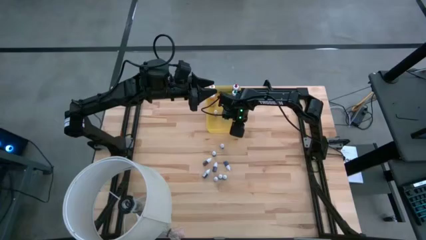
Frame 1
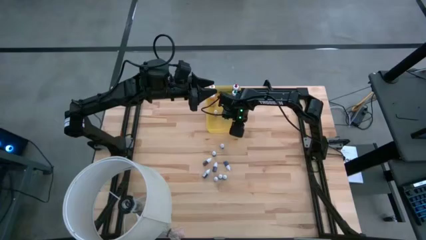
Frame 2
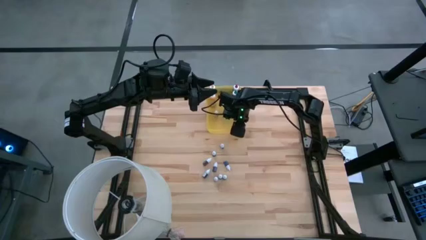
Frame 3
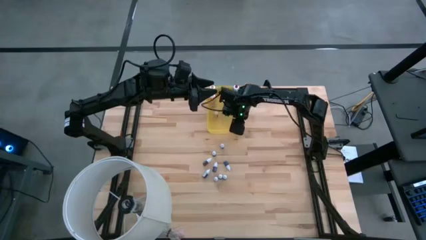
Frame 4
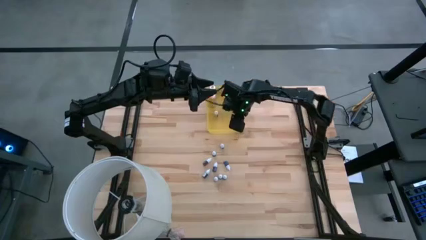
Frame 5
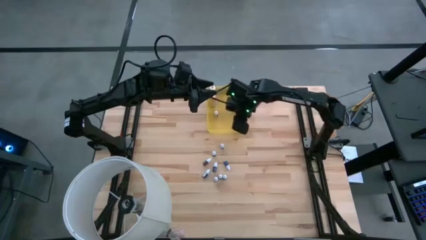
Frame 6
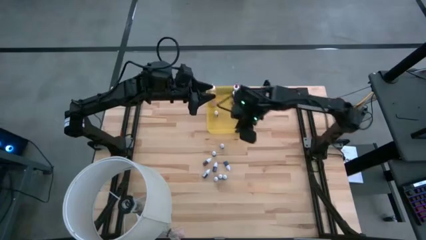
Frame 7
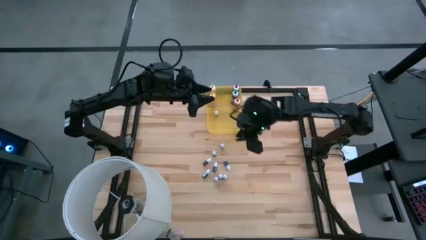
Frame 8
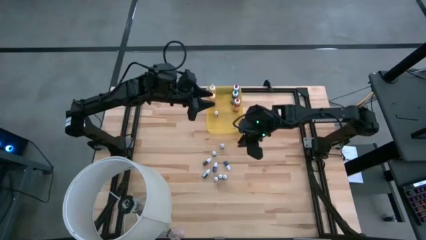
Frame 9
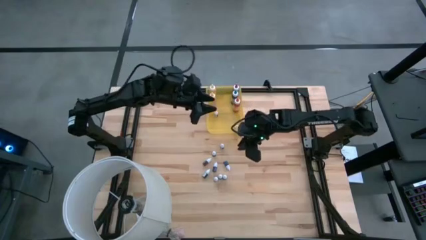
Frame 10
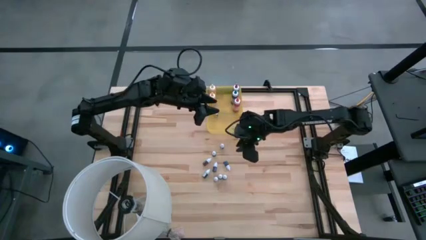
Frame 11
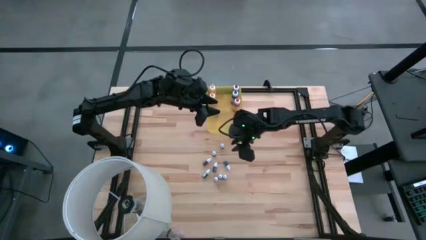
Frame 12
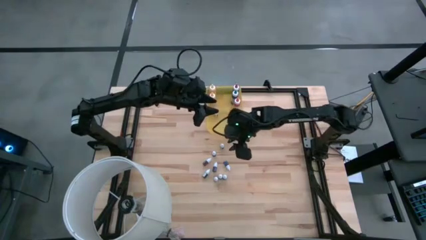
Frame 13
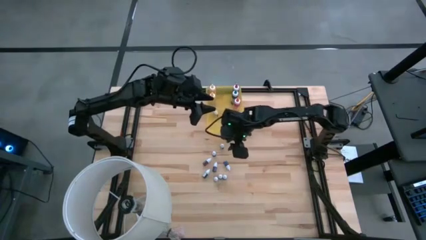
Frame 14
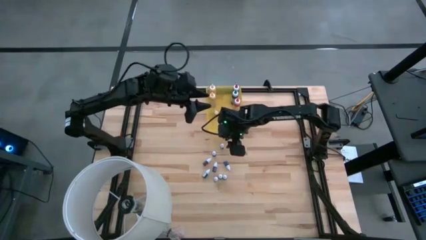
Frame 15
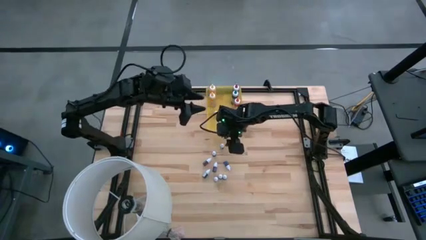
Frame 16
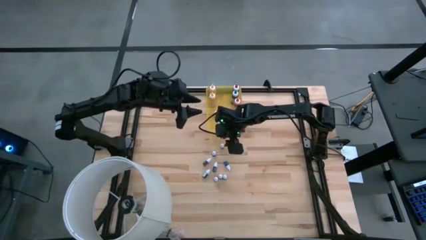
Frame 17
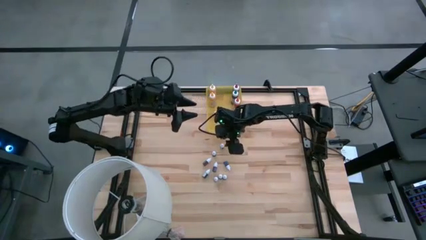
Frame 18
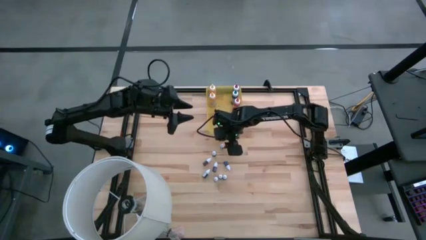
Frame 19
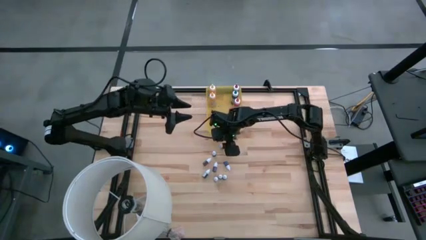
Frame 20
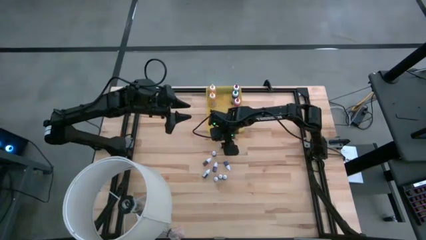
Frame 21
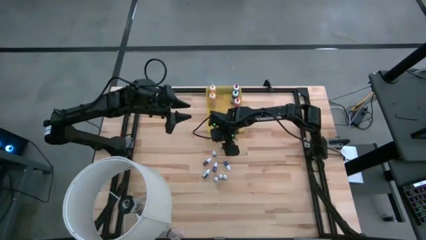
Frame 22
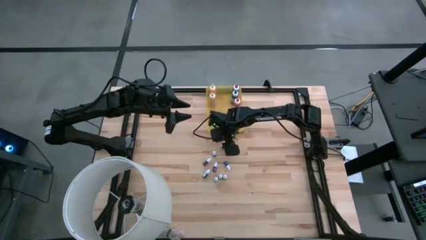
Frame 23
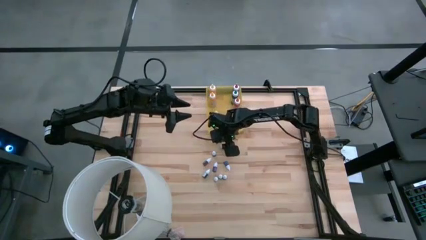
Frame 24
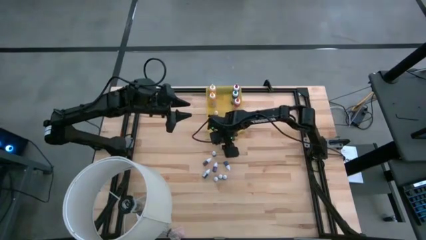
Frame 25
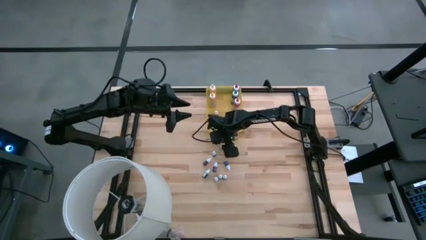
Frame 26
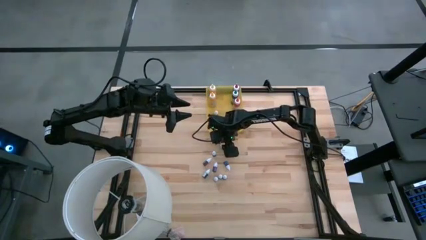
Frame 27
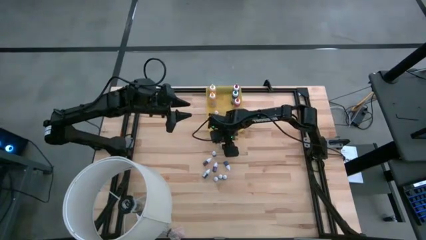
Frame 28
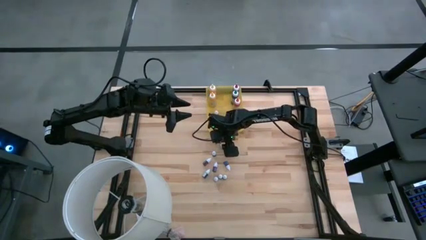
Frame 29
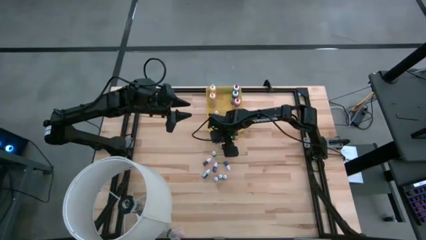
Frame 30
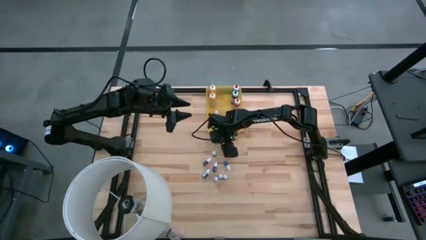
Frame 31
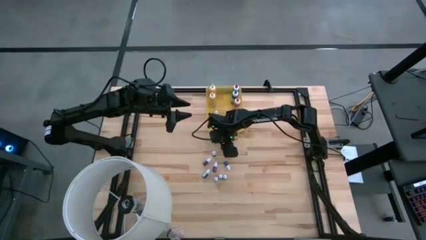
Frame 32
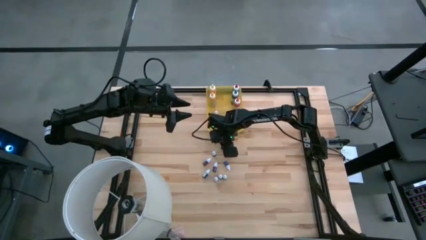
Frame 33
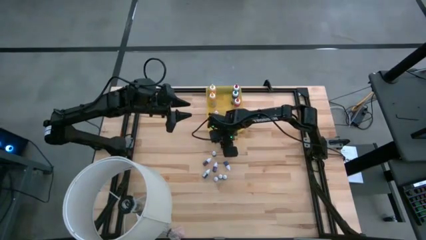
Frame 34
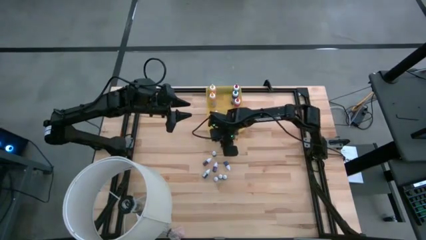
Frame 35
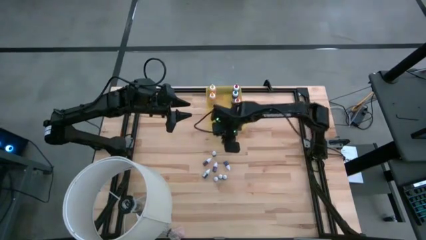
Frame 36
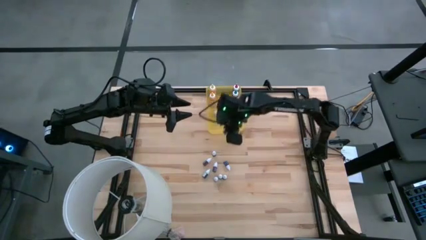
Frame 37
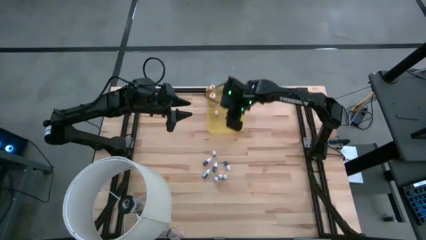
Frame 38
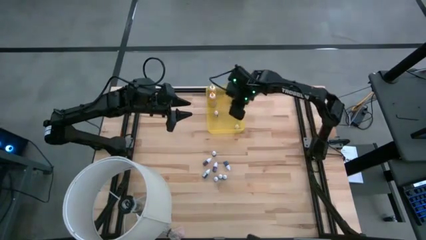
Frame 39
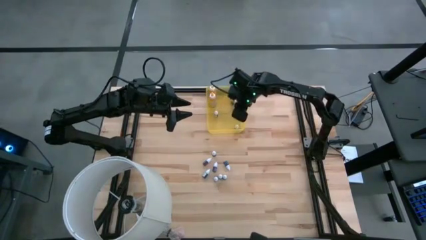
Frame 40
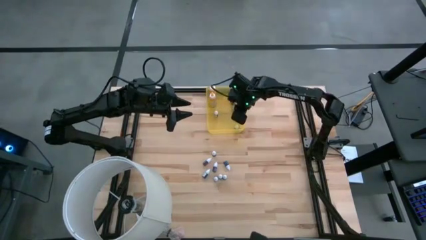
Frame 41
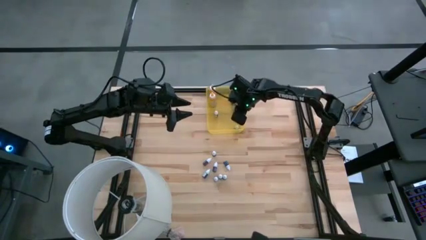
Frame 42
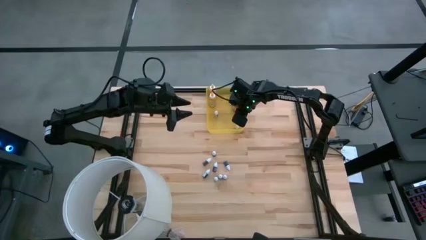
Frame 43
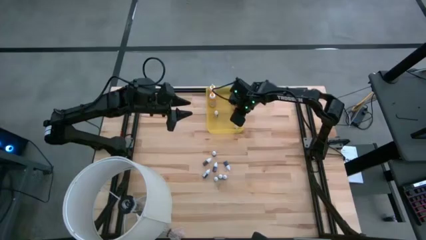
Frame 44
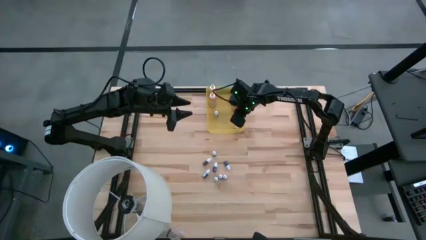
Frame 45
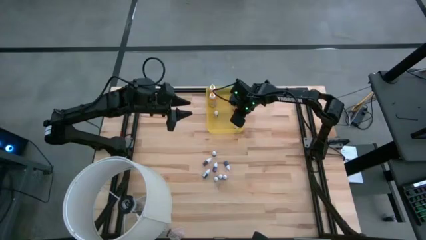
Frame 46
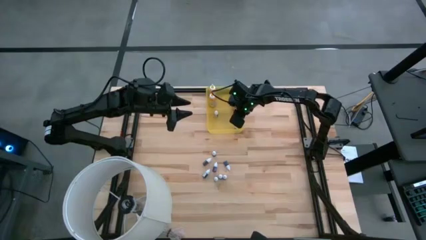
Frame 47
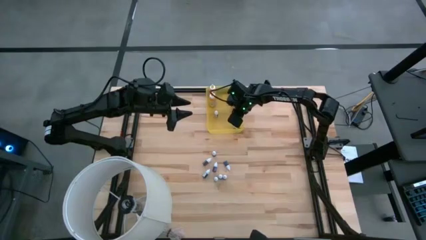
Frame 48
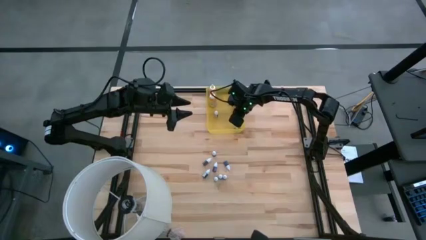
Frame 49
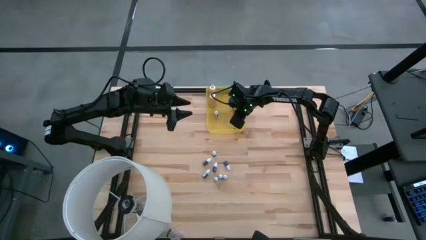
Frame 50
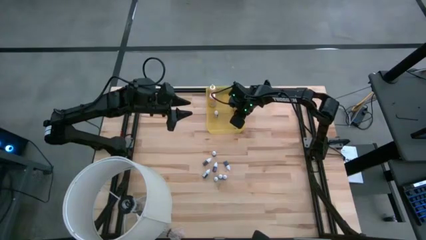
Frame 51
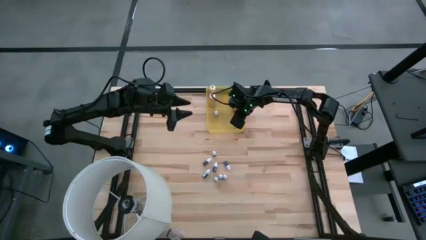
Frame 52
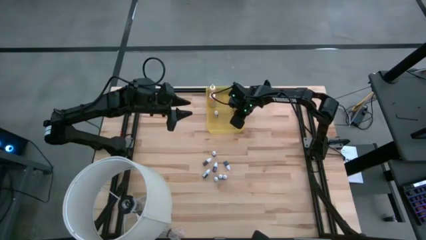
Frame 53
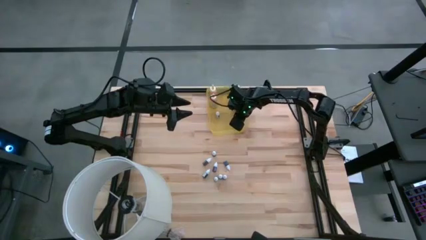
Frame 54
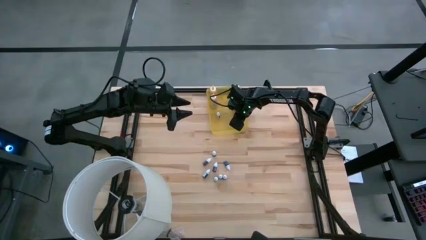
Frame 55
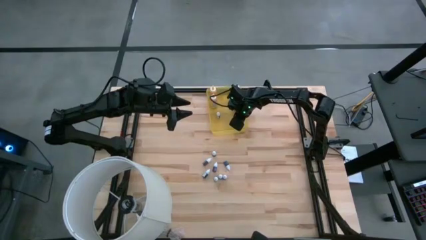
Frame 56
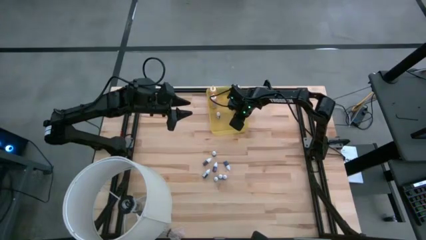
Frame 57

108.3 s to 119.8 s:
Task: Pick & Place food coloring
Put the small orange food coloring bottle into the yellow bin

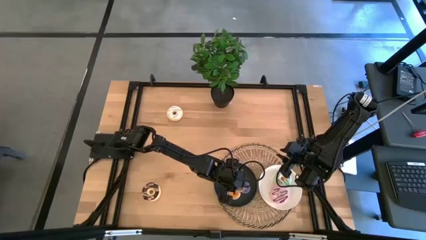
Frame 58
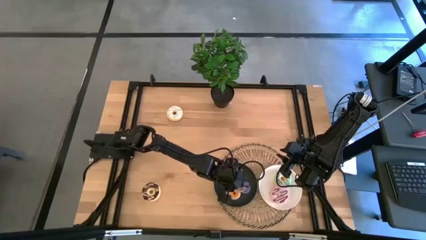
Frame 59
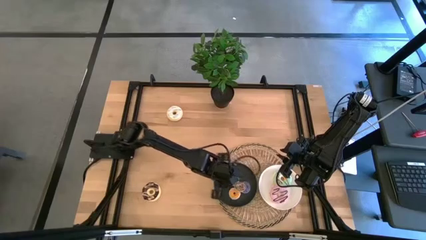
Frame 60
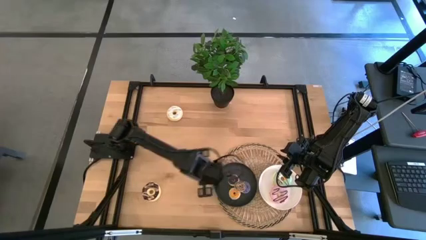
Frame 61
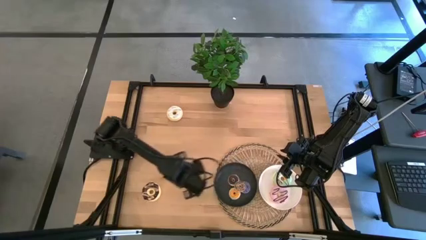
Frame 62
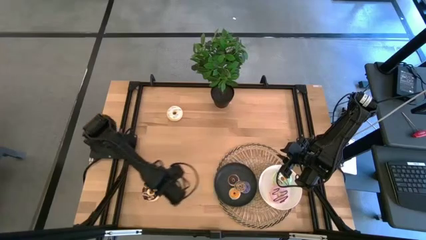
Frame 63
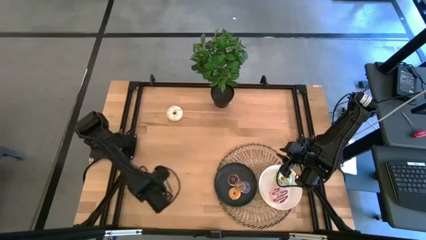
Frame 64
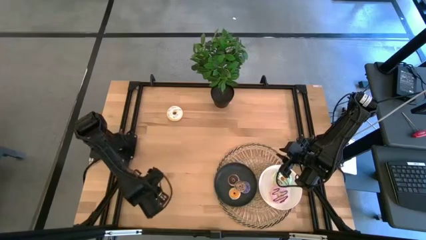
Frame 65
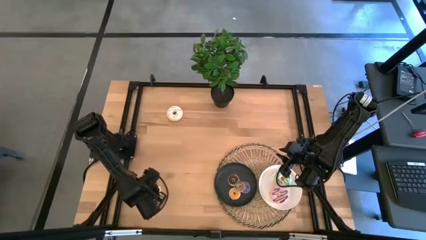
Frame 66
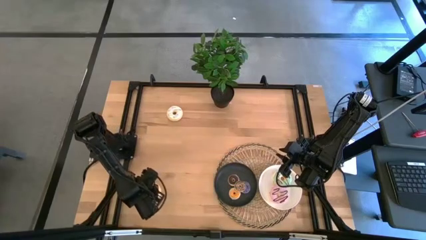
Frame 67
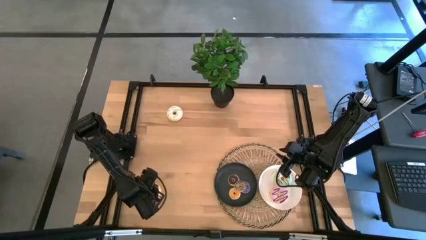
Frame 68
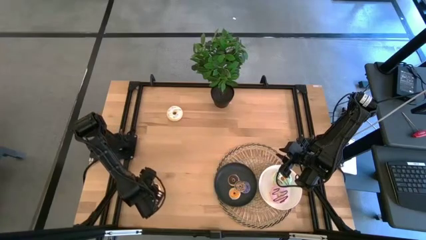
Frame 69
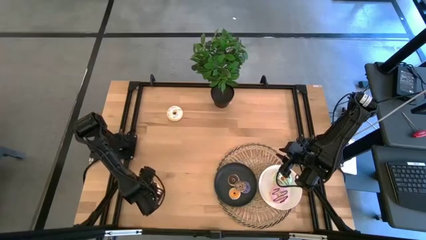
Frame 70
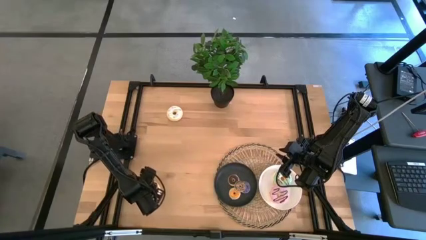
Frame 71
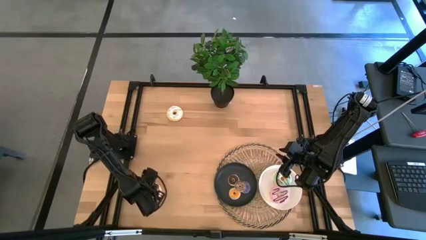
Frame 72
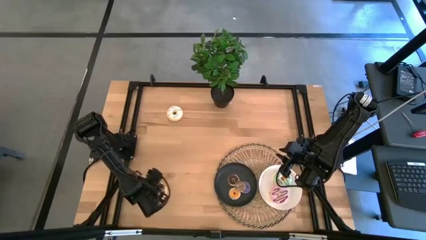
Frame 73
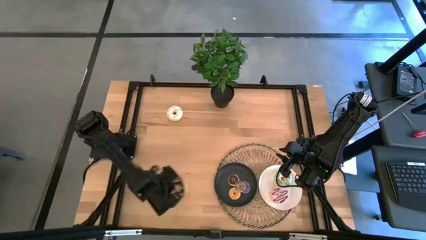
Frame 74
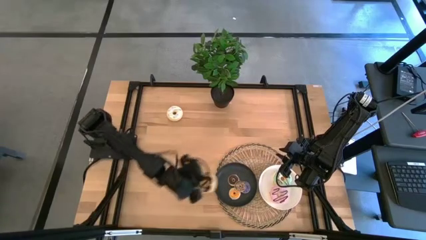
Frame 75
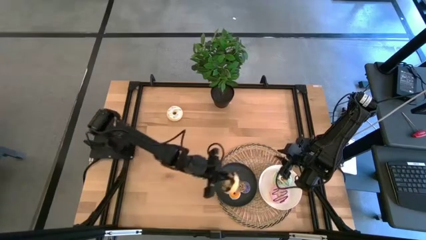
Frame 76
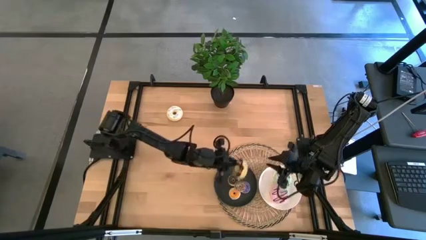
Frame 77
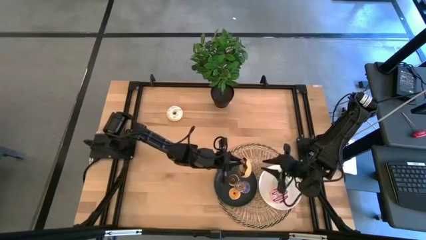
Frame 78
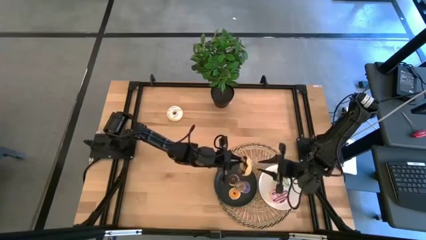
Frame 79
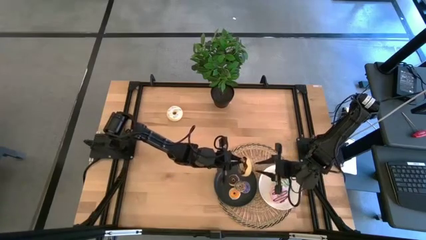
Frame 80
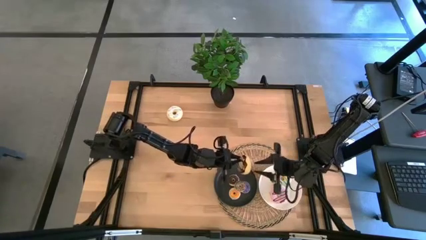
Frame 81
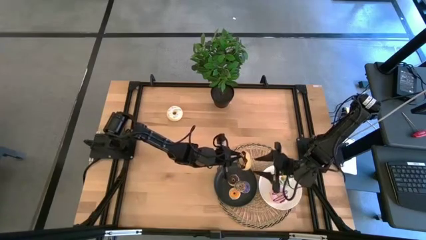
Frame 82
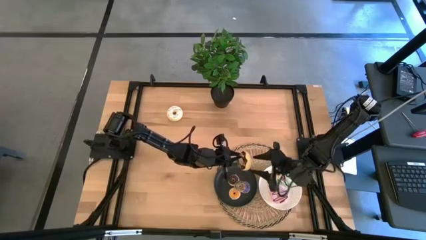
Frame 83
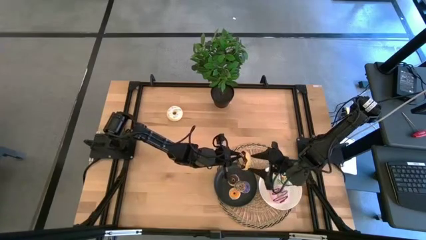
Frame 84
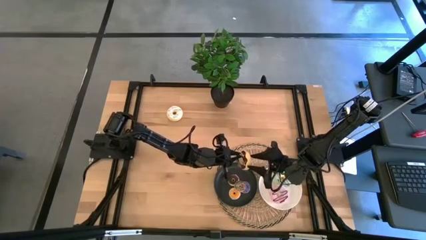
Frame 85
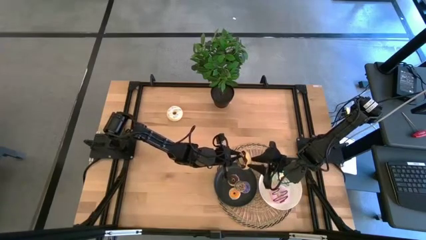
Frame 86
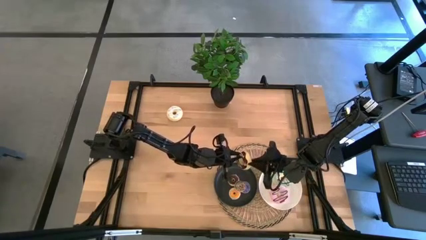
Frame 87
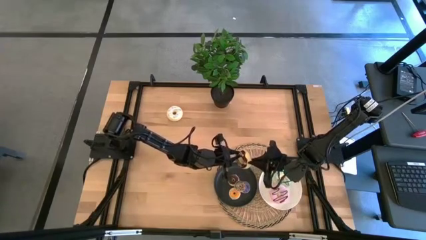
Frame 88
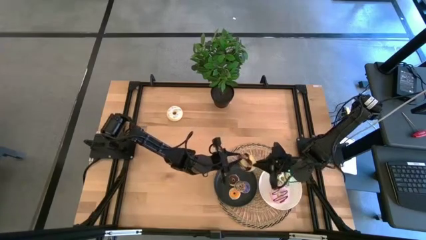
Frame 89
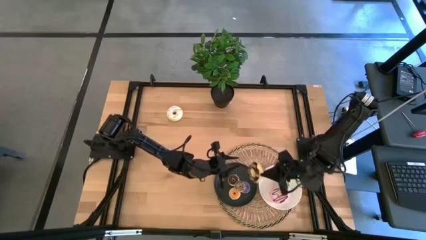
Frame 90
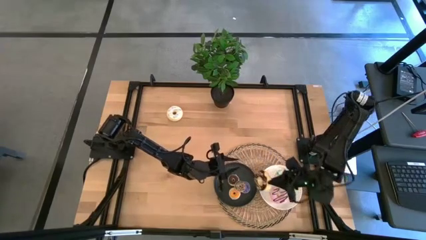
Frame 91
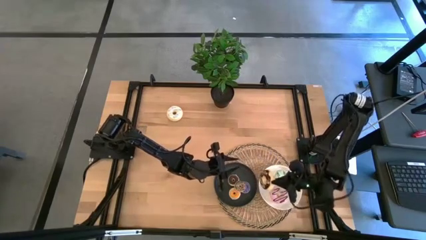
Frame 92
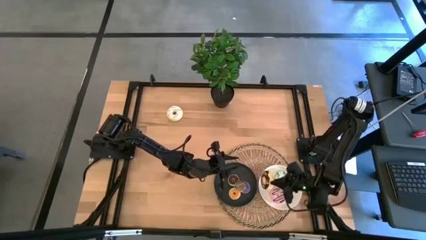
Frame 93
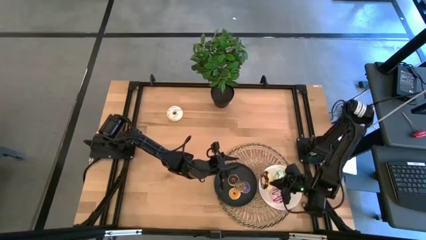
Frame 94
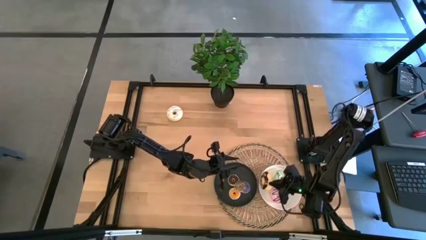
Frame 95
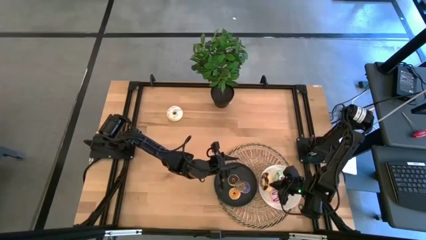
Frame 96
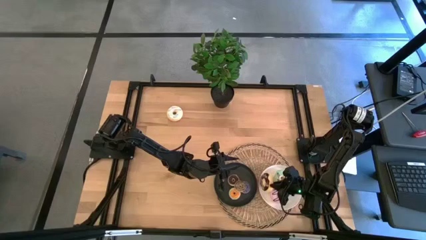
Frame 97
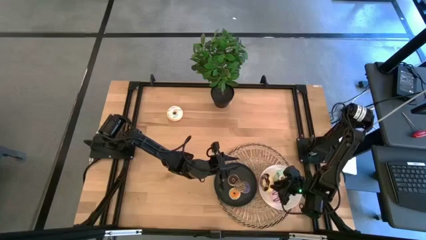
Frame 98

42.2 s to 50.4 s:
Task: Pick & Place donuts
Put the big black donut on the white plate
